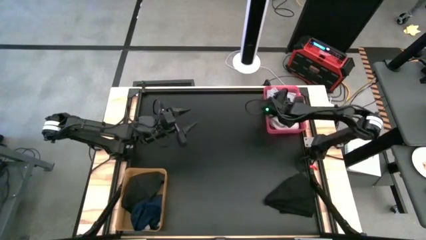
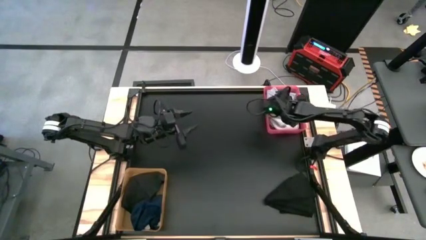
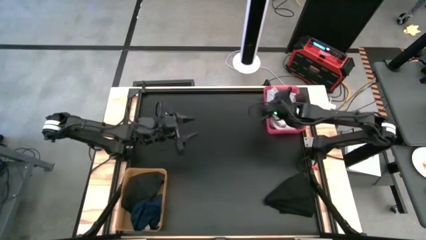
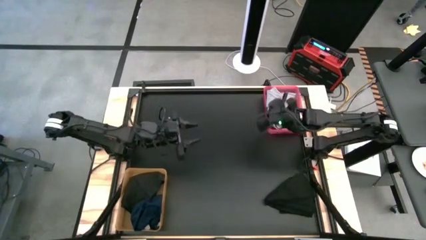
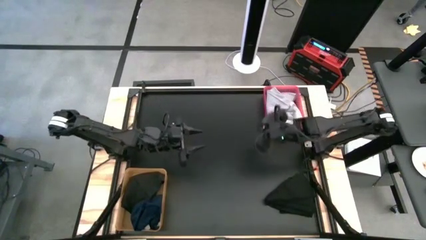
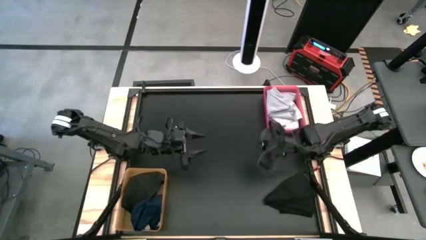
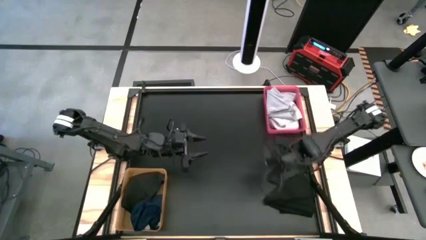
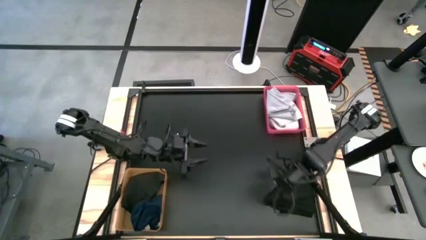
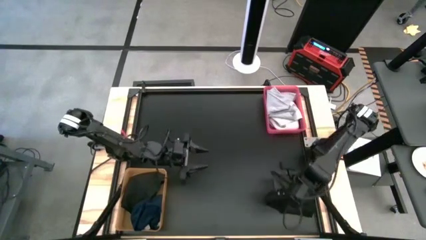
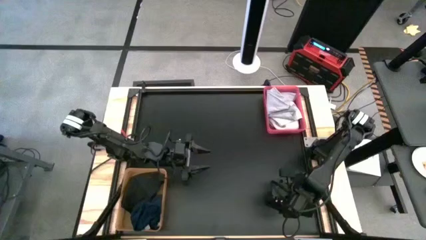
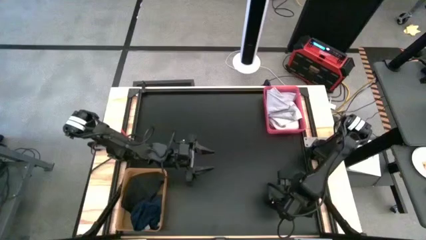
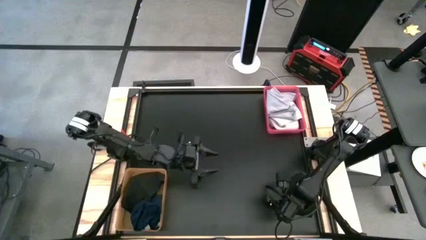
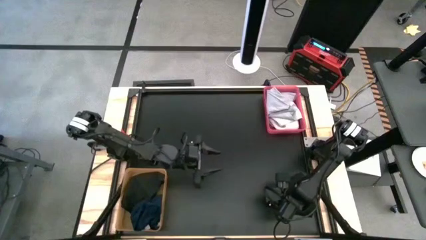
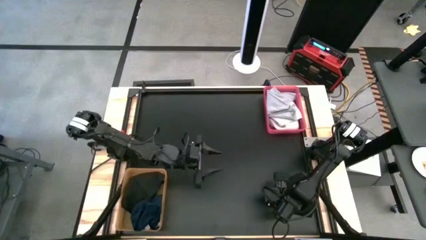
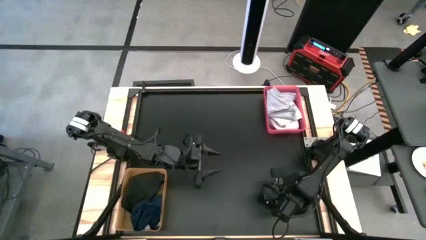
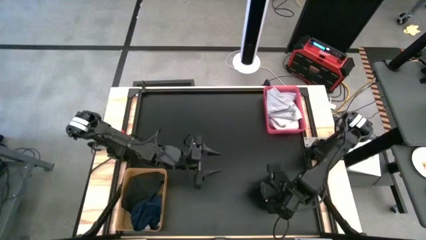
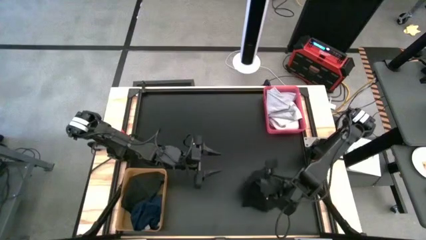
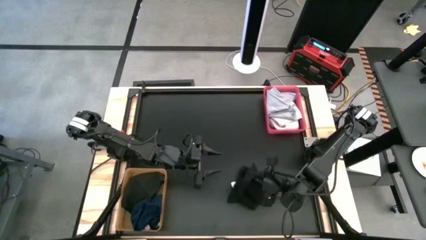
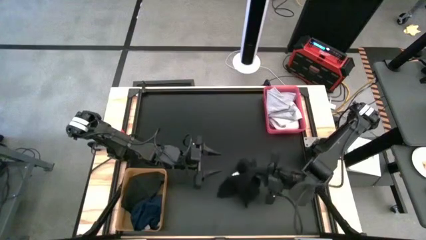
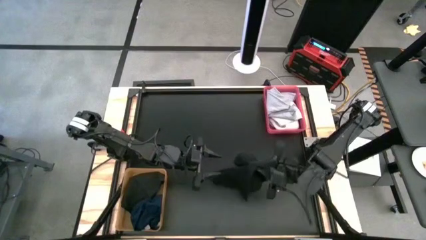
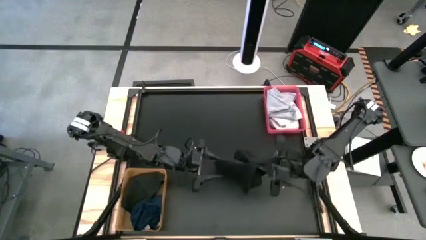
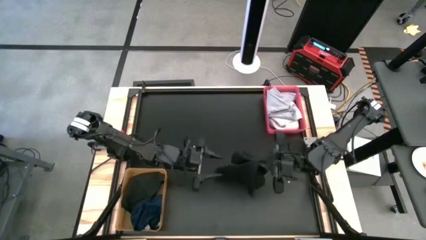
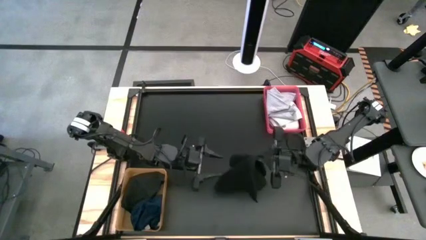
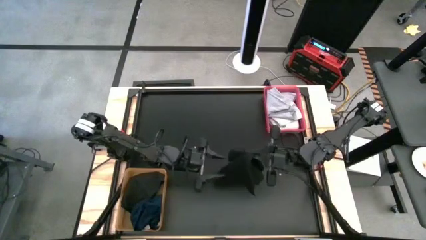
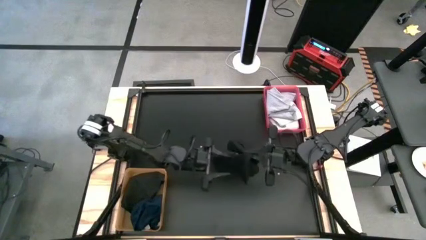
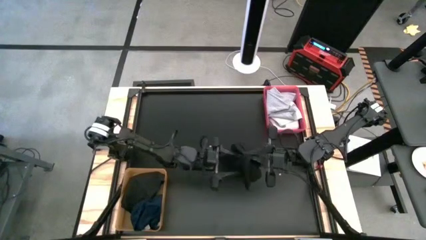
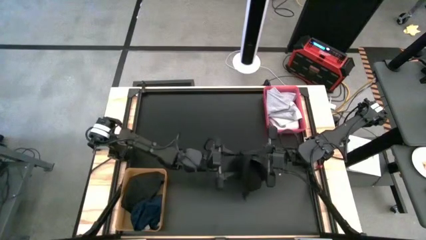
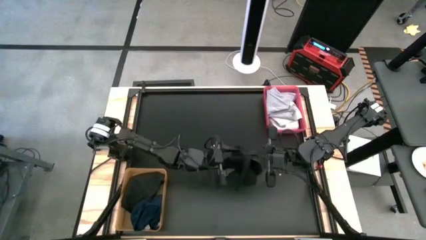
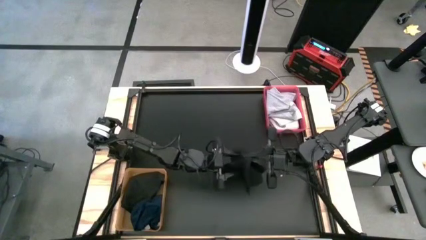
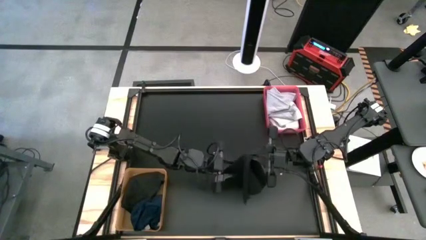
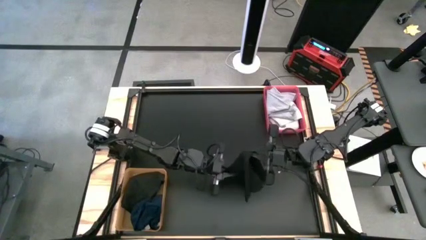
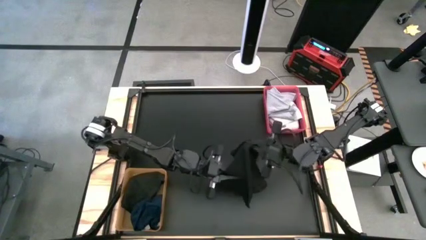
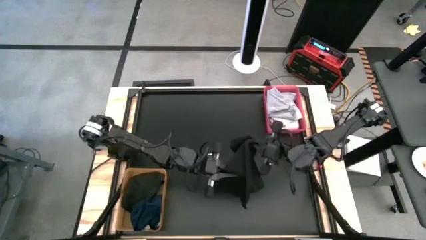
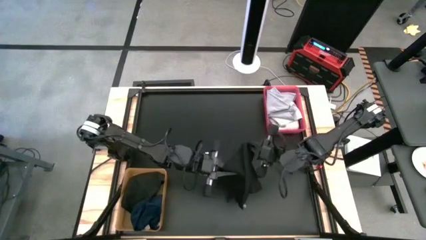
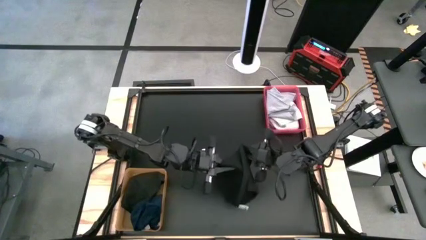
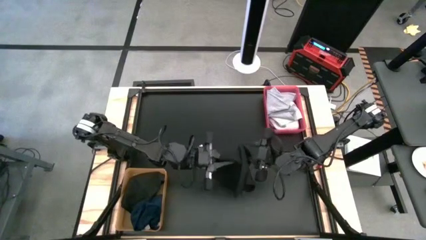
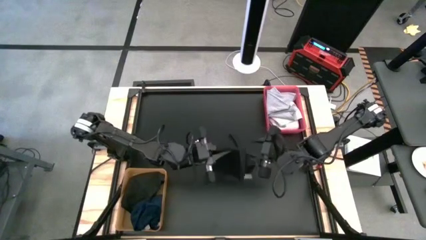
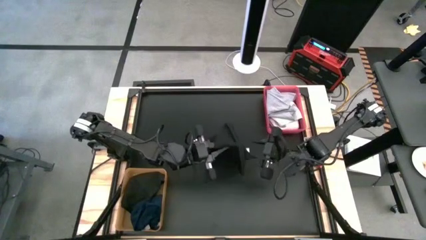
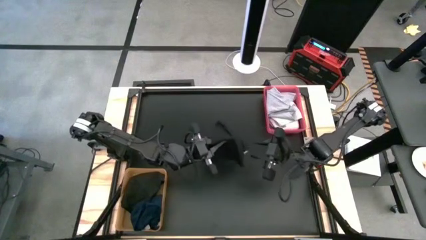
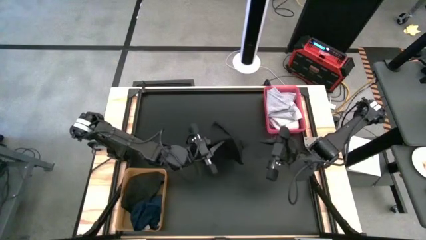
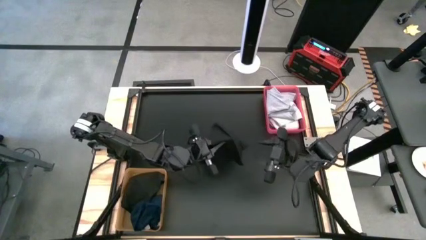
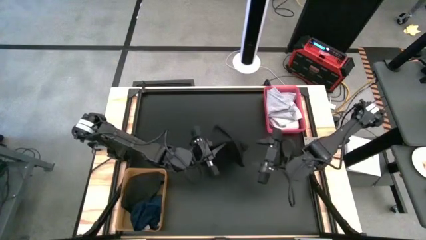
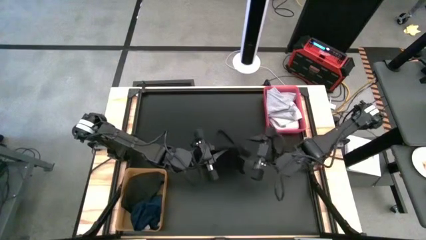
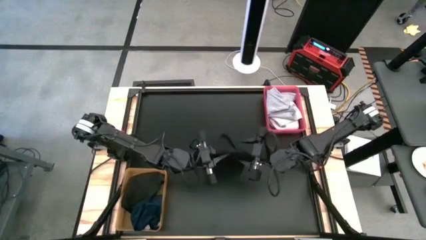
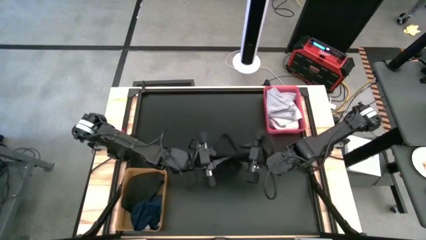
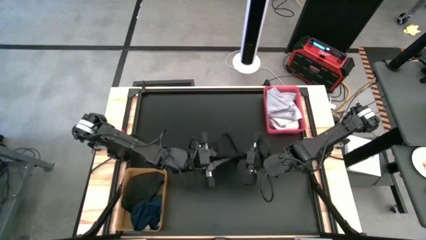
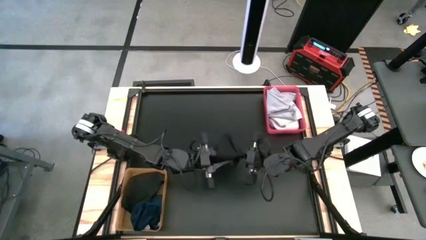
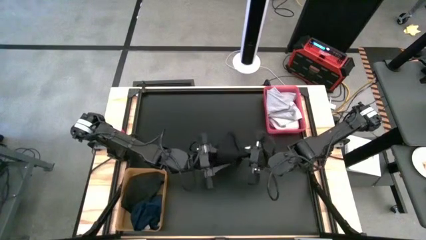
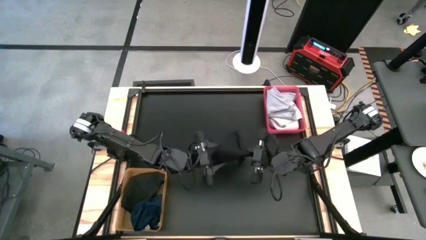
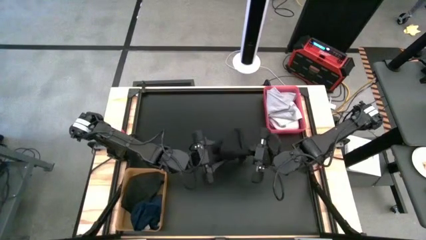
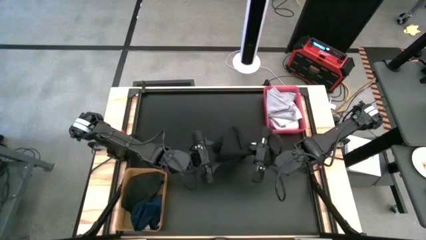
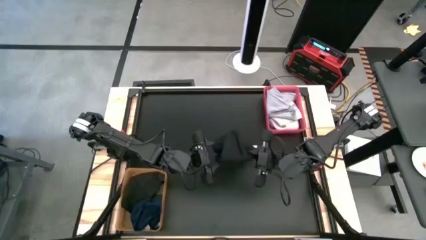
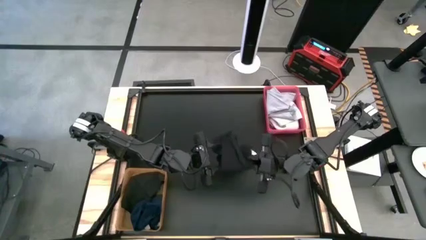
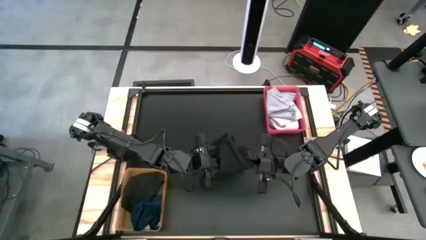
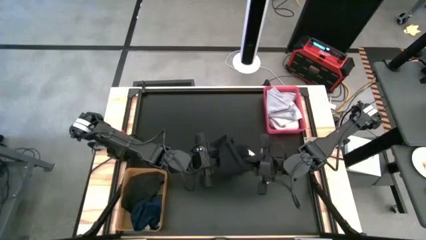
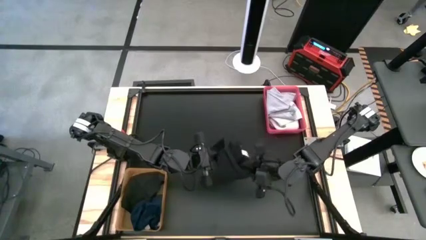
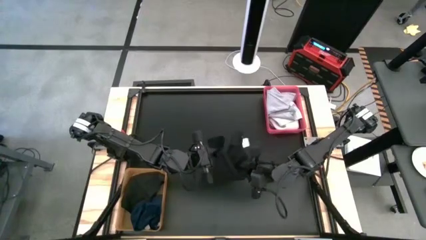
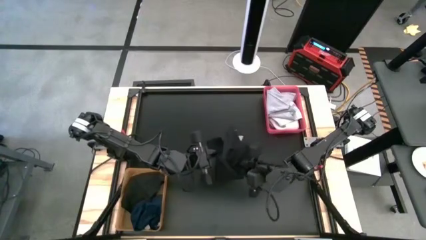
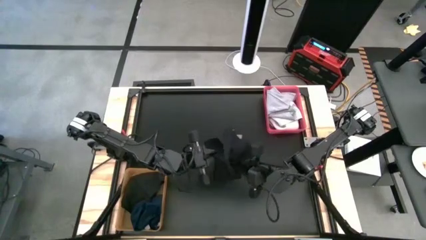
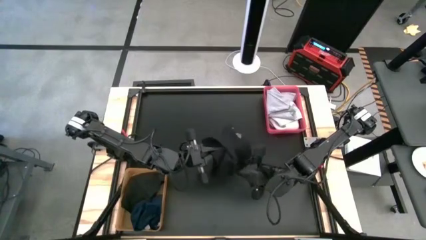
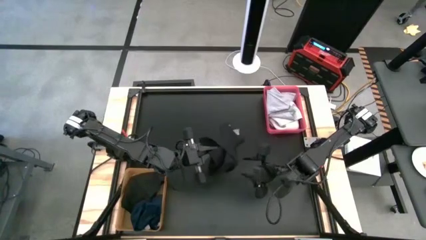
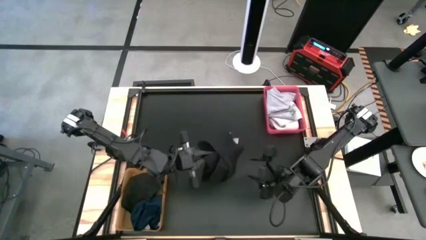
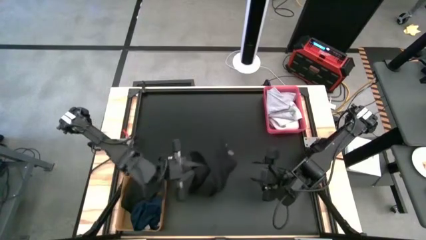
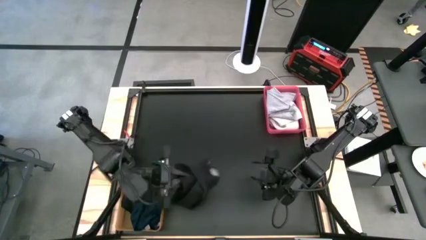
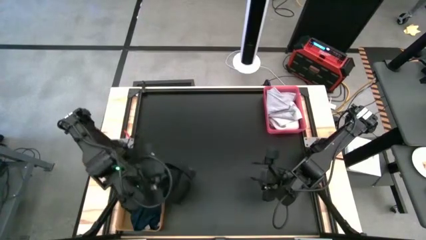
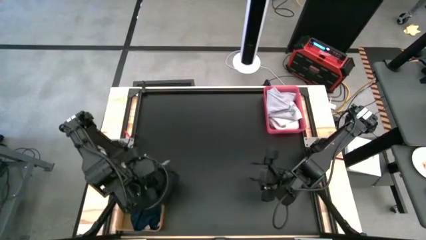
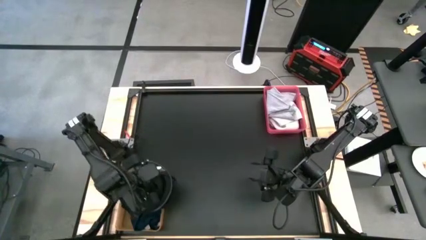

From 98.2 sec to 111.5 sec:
Task: Sort towels by color in basket
Put the black kitchen towel into the orange bin
